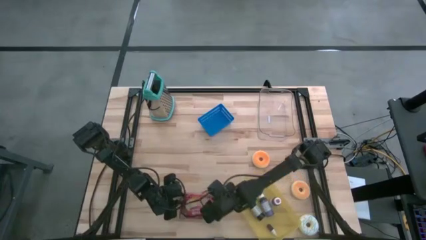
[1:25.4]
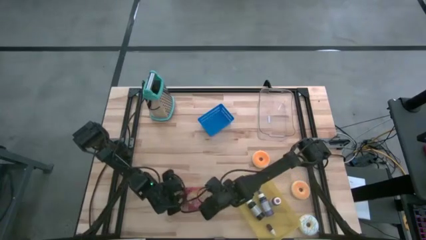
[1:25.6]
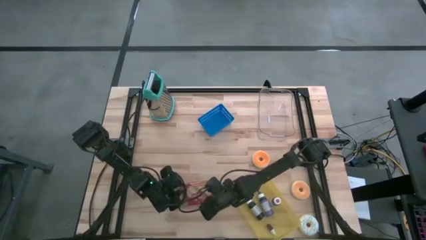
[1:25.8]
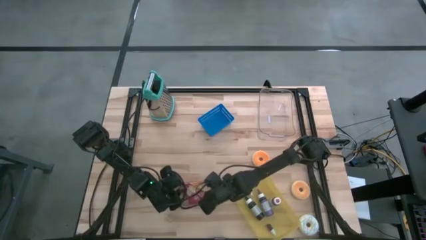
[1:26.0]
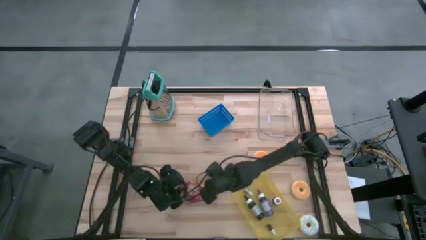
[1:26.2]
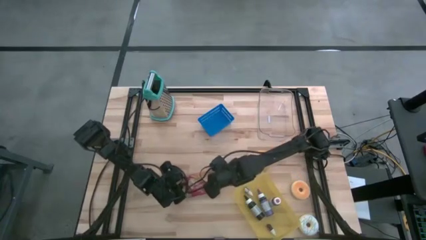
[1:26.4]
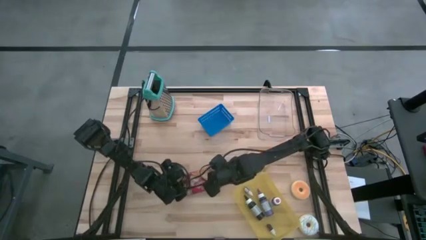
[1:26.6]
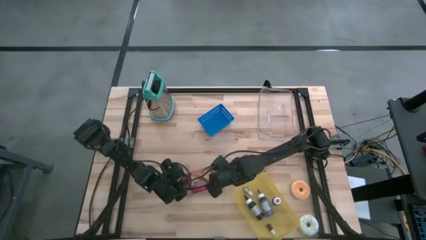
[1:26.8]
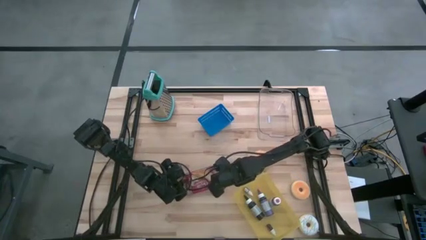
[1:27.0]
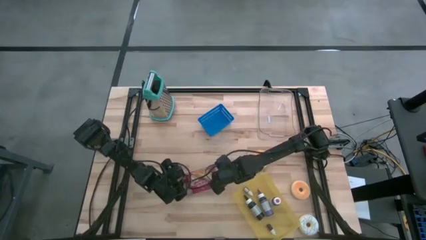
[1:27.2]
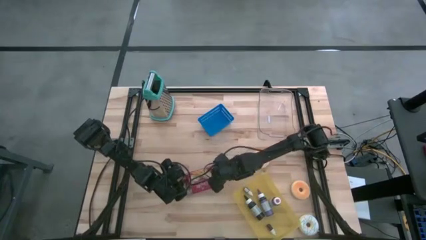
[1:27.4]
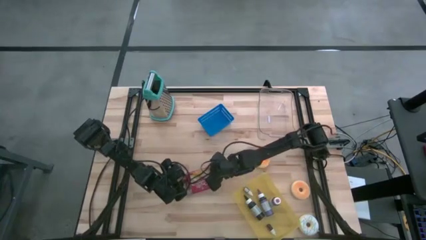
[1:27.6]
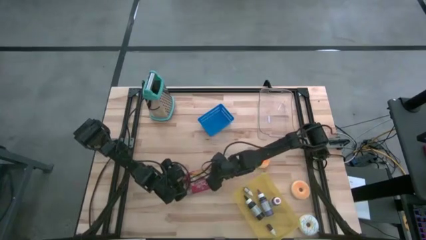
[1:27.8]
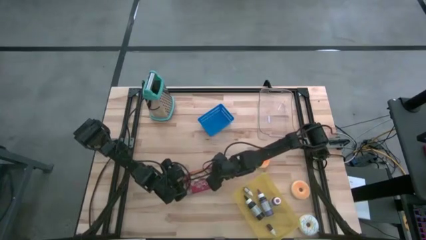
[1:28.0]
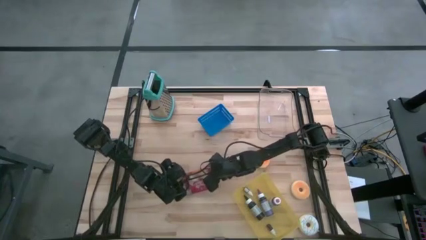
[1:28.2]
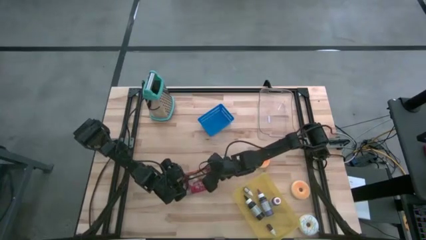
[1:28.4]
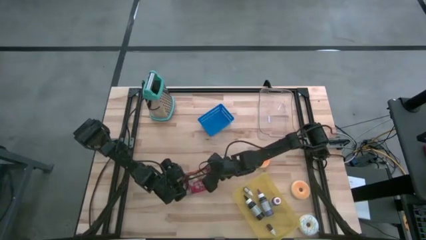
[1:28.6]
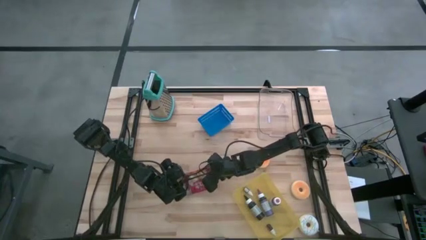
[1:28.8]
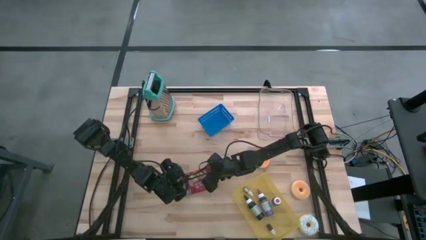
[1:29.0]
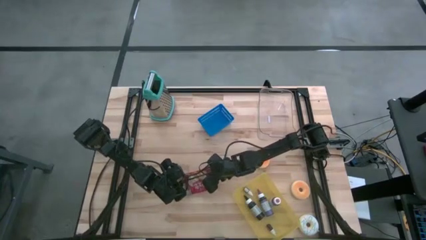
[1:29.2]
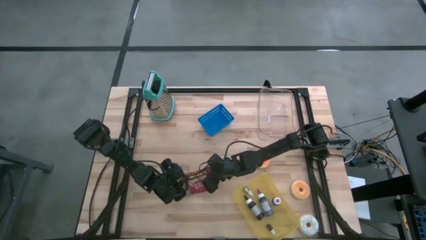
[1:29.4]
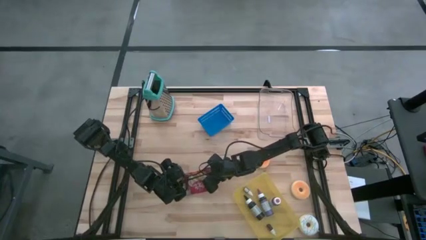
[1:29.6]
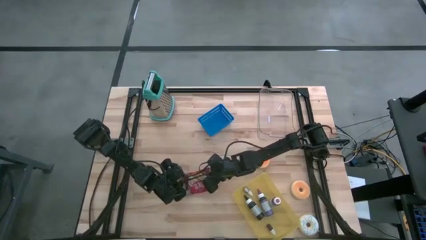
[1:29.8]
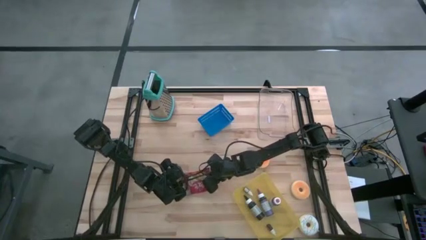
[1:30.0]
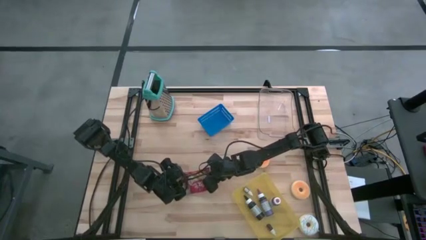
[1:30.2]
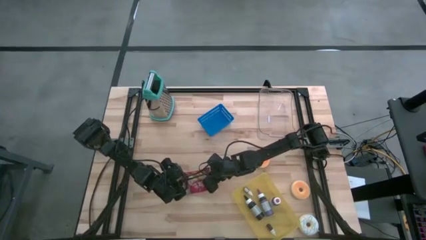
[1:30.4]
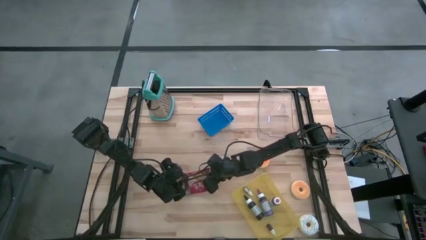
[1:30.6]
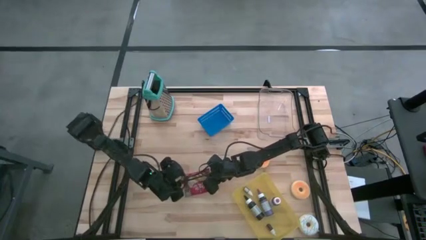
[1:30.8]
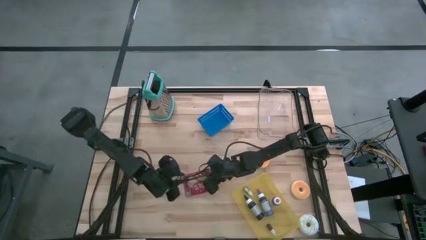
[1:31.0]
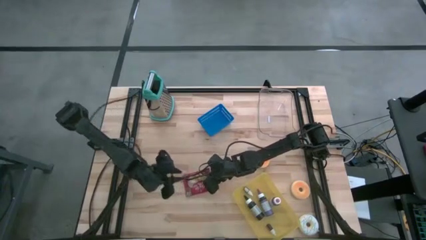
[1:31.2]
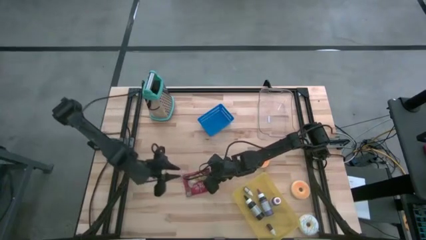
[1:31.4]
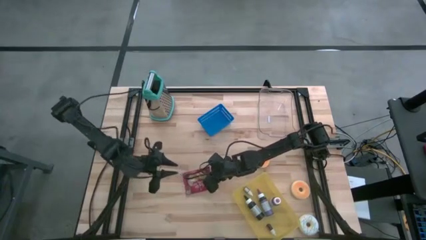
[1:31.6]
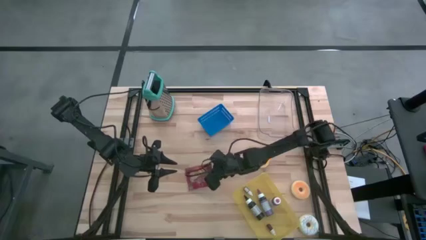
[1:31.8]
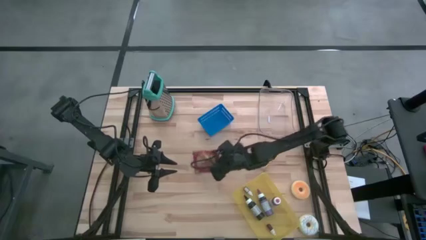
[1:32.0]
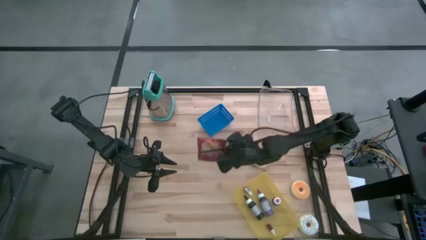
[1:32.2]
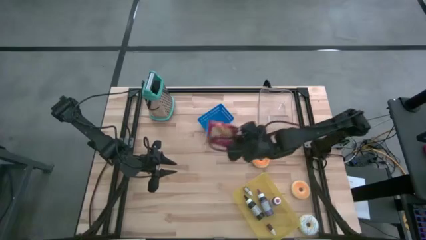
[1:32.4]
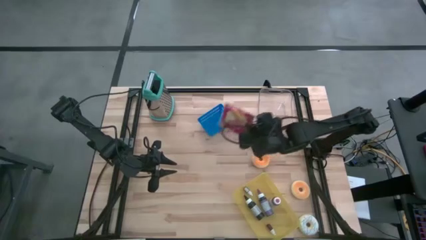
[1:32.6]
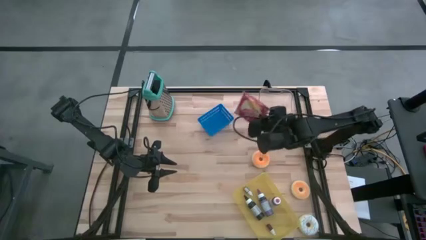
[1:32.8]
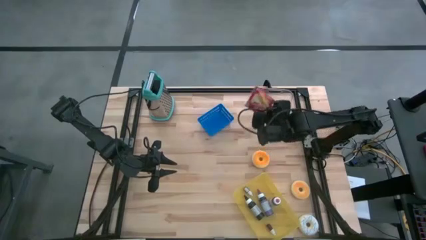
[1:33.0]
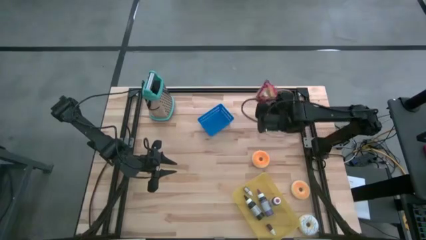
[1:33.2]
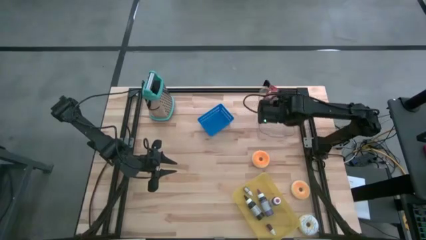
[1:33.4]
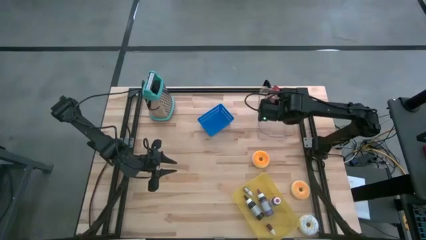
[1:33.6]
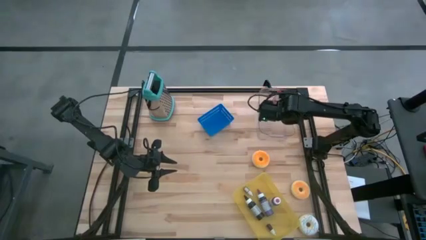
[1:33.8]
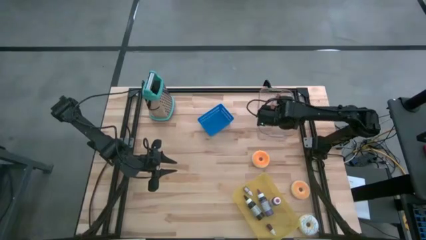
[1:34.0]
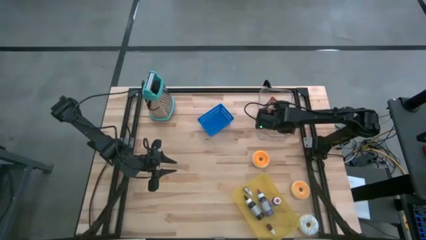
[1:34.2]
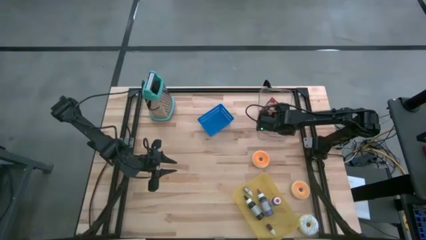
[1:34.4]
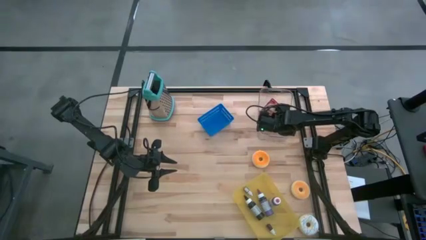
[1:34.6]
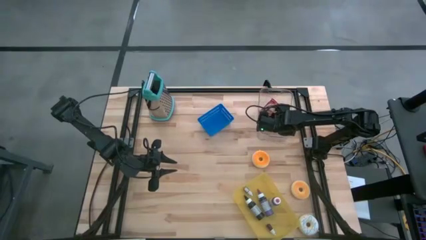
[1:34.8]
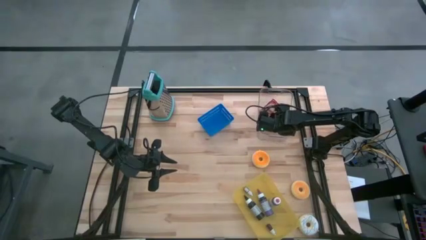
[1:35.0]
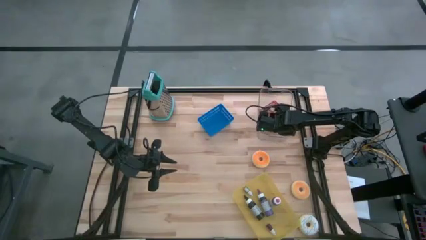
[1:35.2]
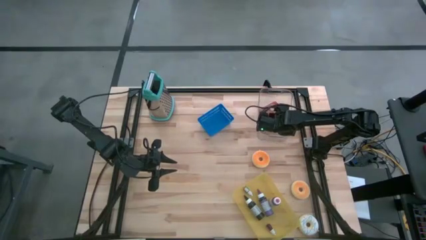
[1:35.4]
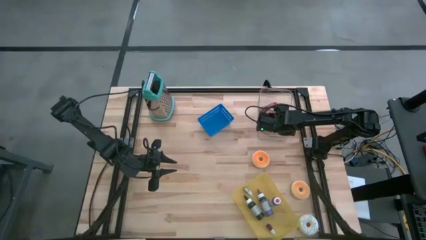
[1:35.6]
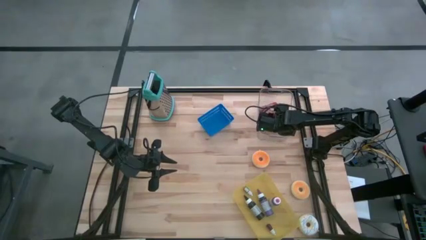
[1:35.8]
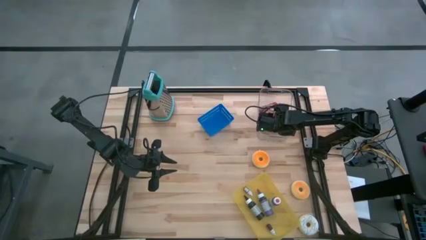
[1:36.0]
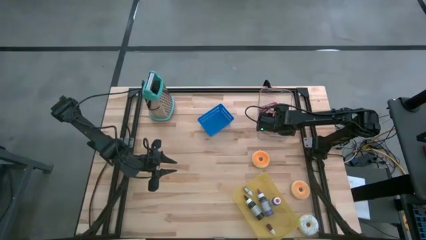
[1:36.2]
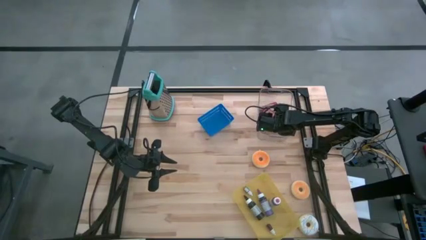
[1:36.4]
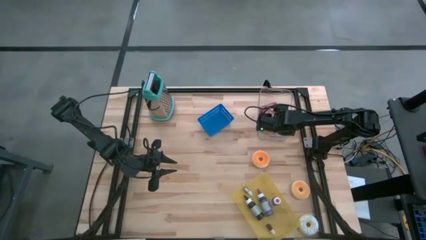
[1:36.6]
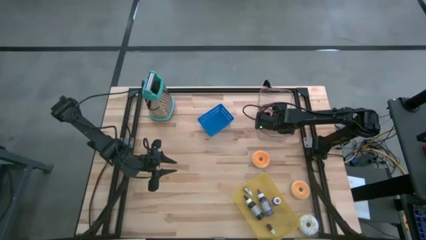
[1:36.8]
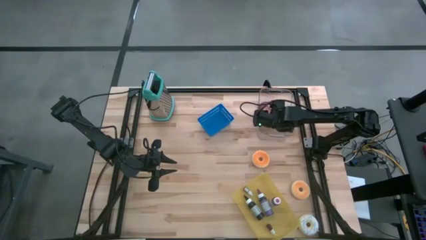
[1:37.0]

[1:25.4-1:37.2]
Task: Pick & Place Food Item
Put the popcorn butter into the transparent bin

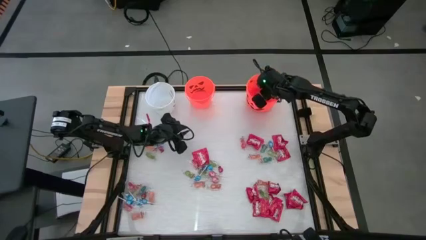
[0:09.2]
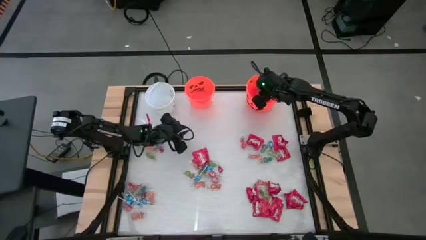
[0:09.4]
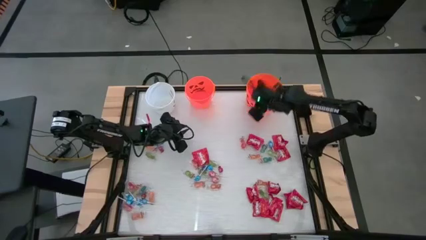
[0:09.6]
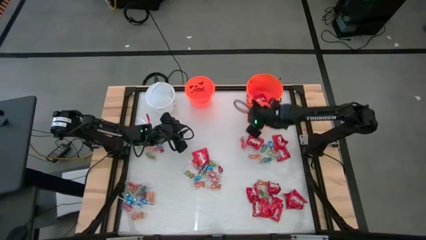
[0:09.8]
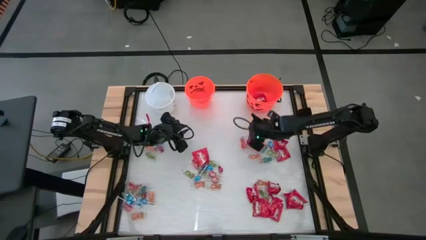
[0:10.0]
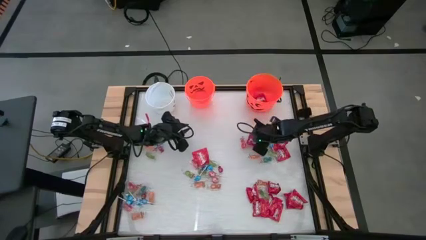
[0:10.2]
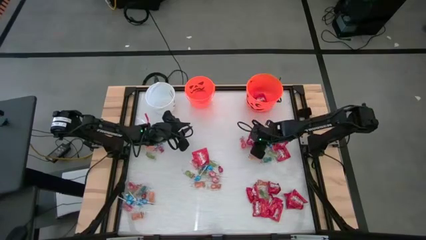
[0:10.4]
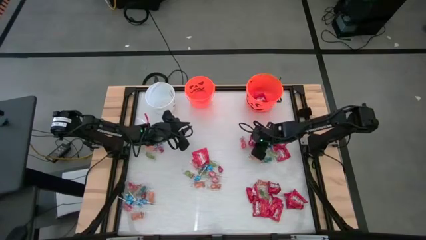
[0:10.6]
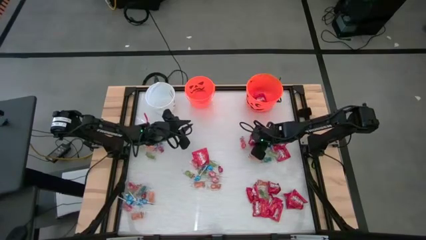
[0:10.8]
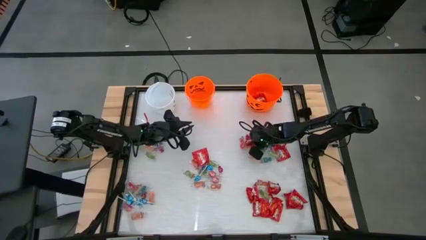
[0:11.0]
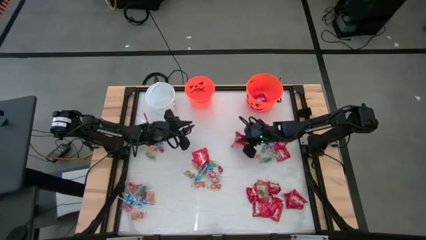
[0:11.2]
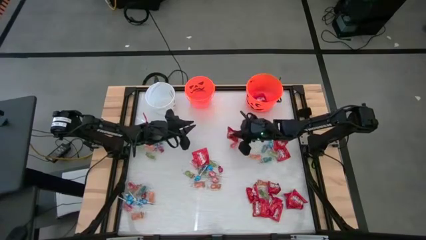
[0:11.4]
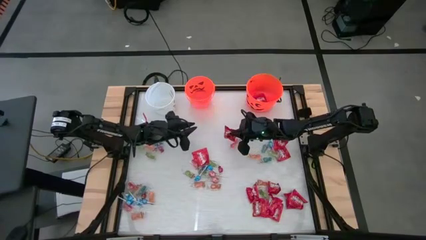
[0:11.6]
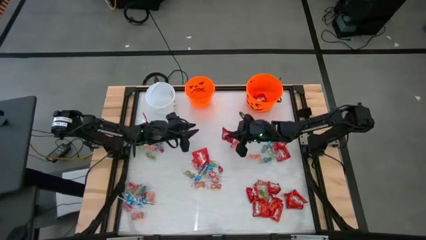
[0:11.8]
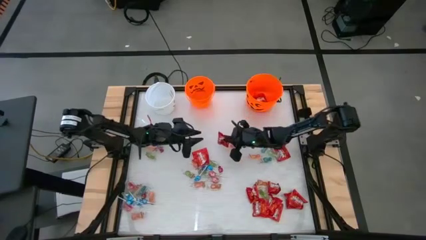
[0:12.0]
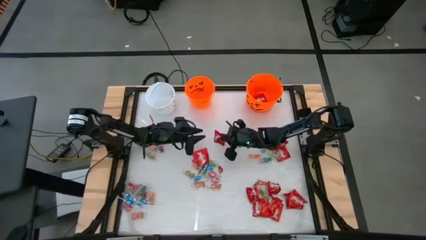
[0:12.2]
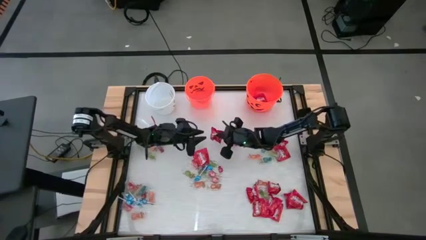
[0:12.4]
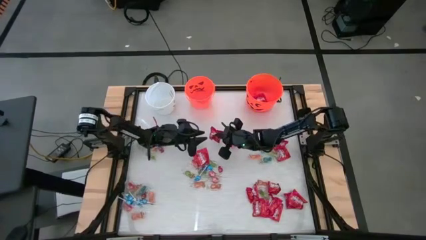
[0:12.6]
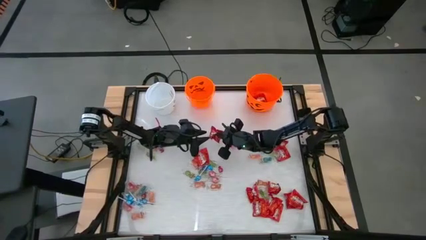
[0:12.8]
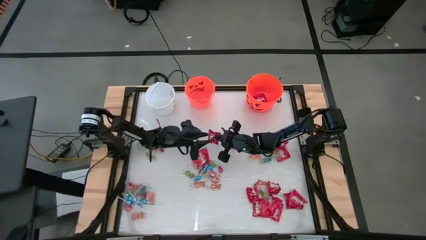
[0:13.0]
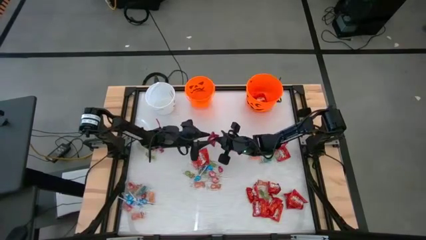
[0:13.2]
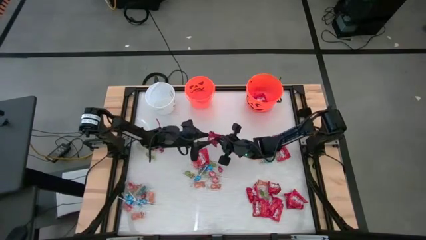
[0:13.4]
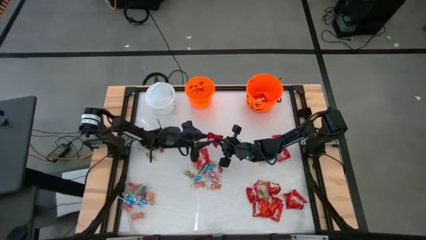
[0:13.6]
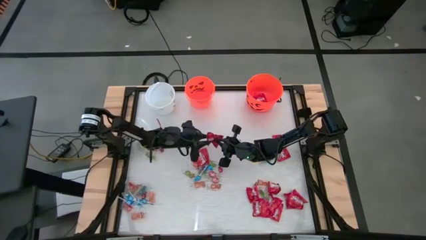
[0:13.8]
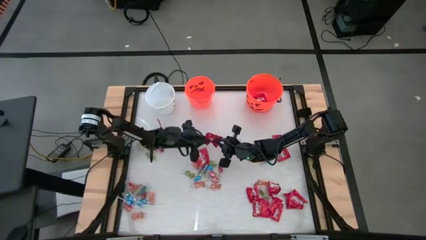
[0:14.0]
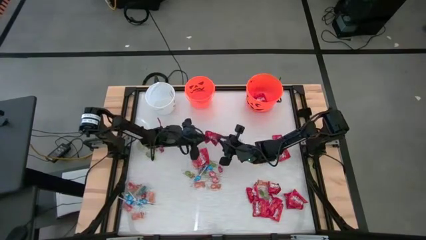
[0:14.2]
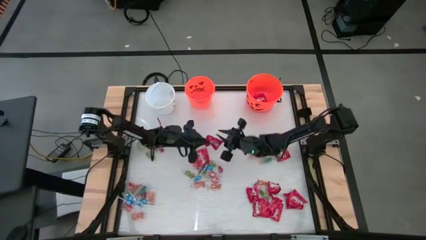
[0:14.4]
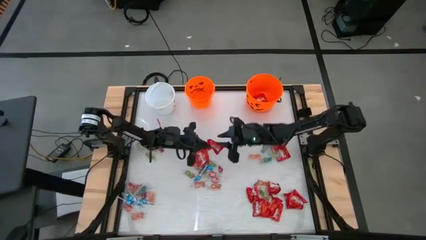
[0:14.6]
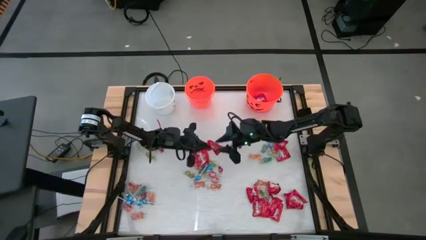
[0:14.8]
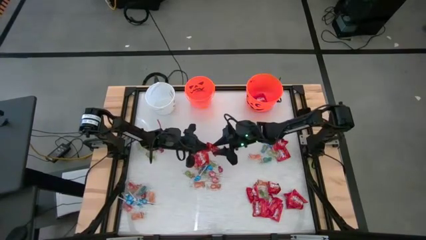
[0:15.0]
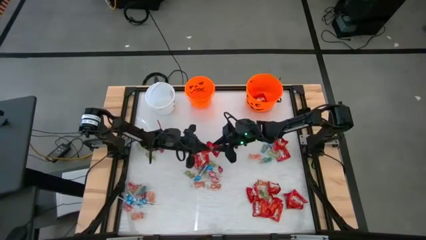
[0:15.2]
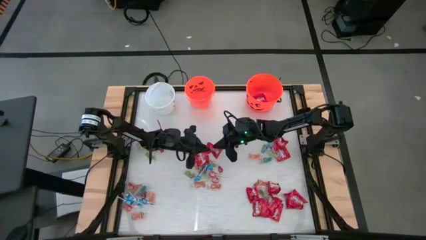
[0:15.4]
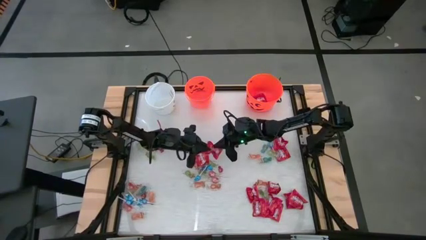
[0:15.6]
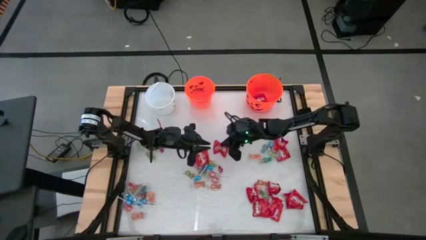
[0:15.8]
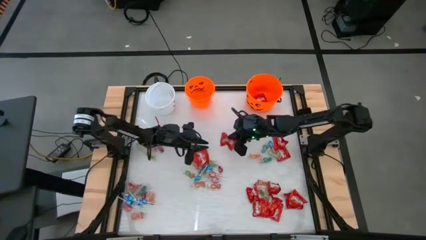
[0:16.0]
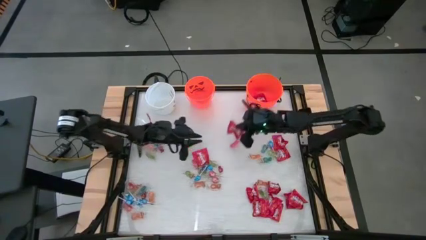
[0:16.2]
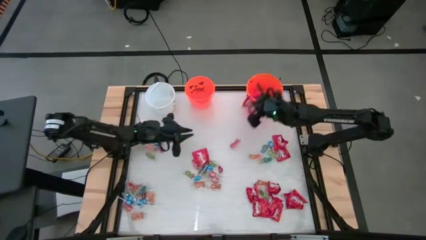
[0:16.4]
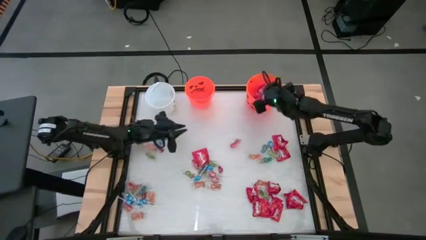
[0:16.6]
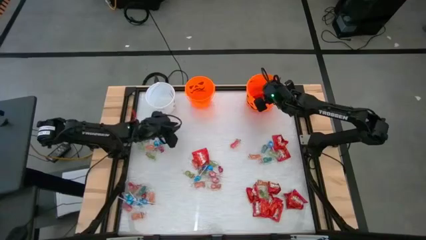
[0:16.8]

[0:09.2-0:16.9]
Task: Sort candy by brand, put in halloween buckets
Put the red candy into the right orange bucket
